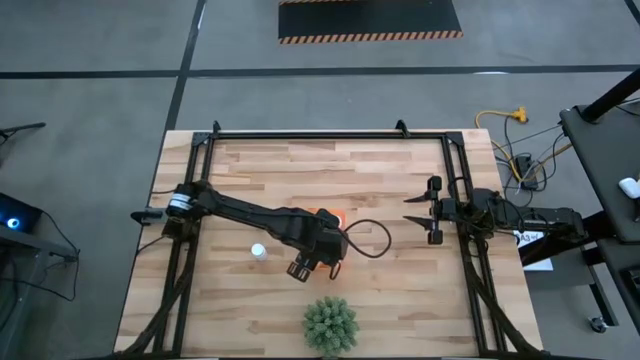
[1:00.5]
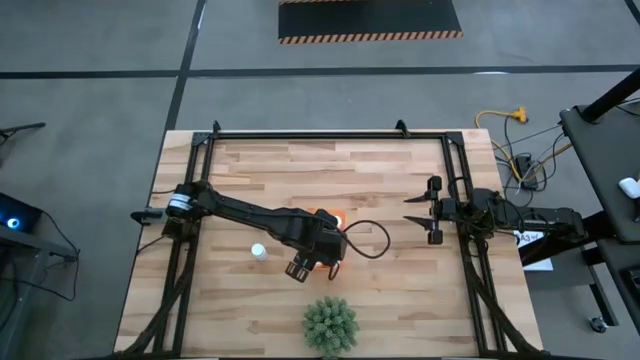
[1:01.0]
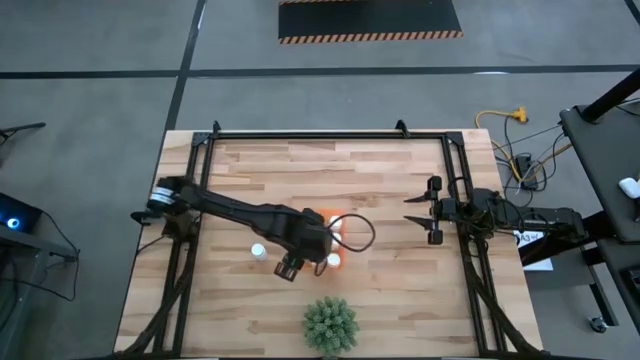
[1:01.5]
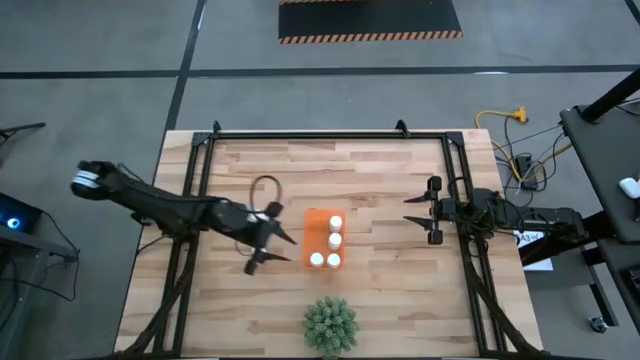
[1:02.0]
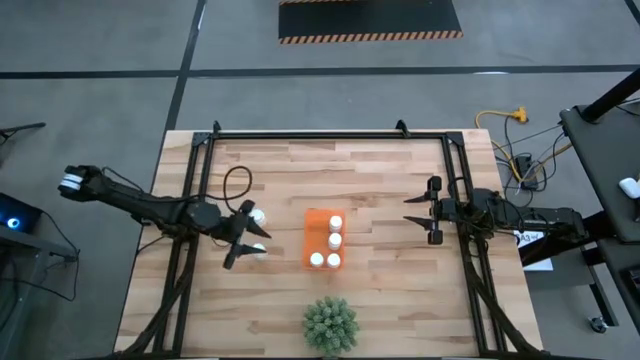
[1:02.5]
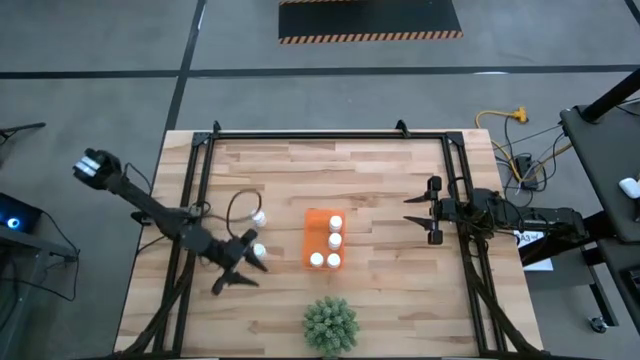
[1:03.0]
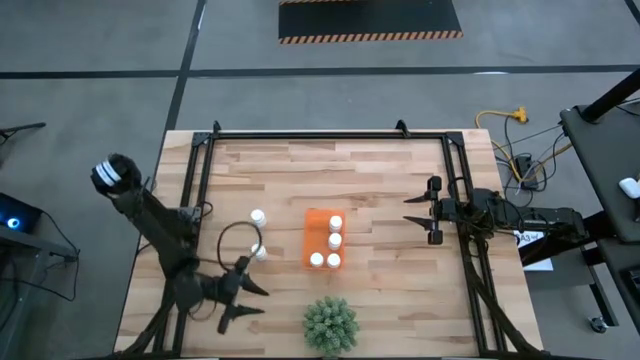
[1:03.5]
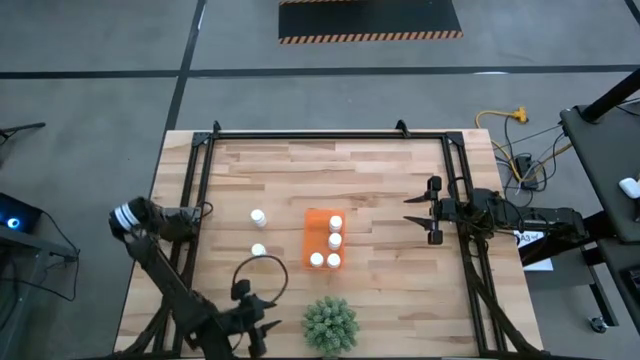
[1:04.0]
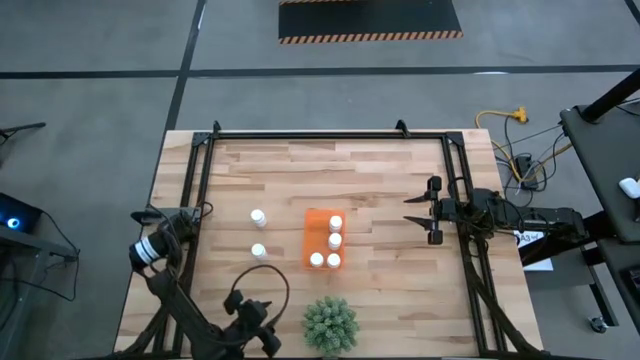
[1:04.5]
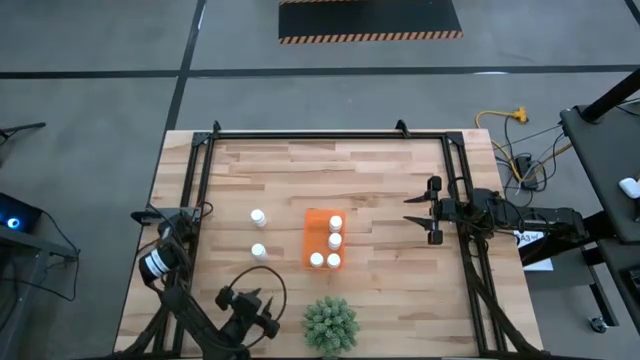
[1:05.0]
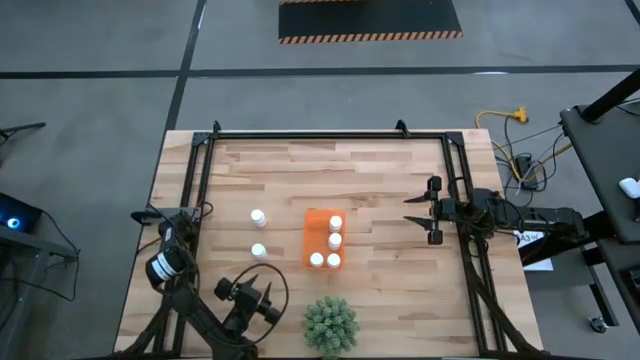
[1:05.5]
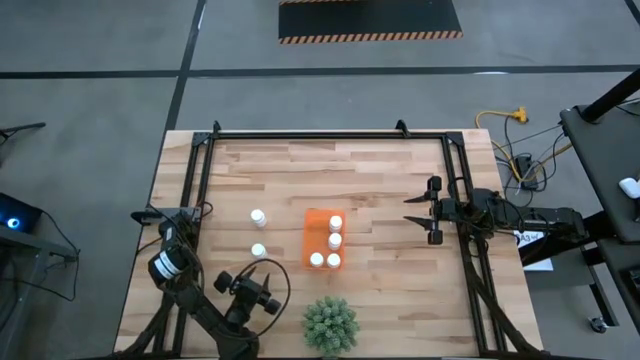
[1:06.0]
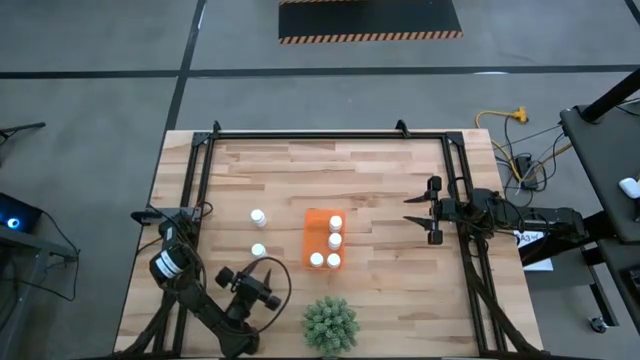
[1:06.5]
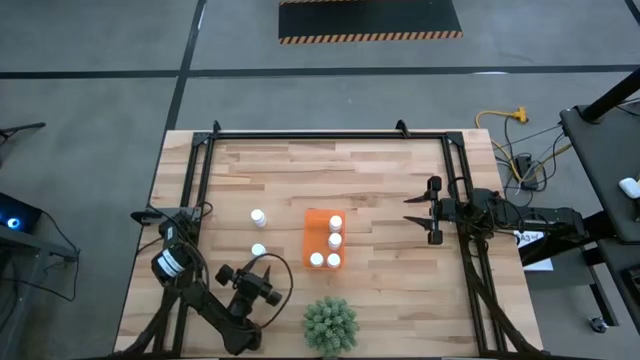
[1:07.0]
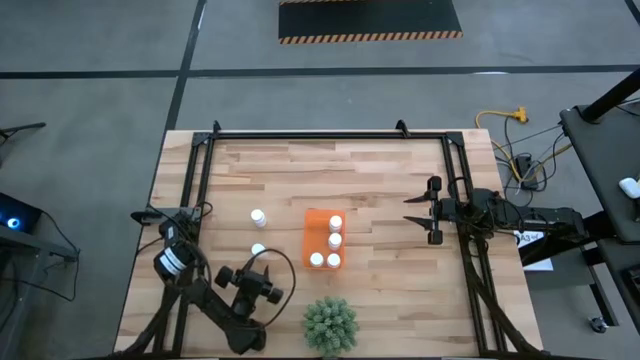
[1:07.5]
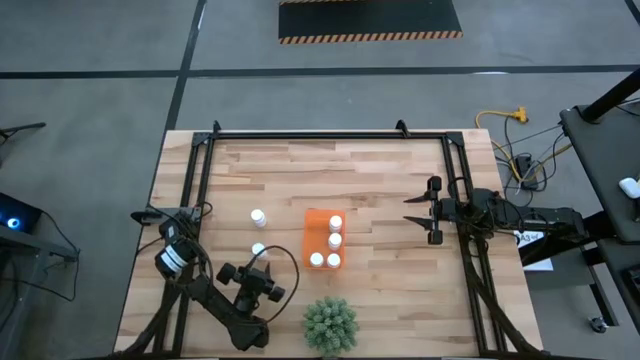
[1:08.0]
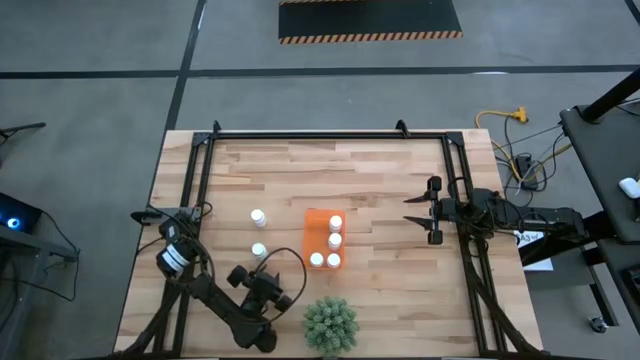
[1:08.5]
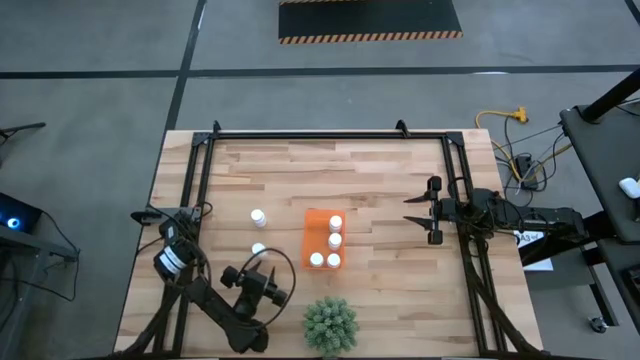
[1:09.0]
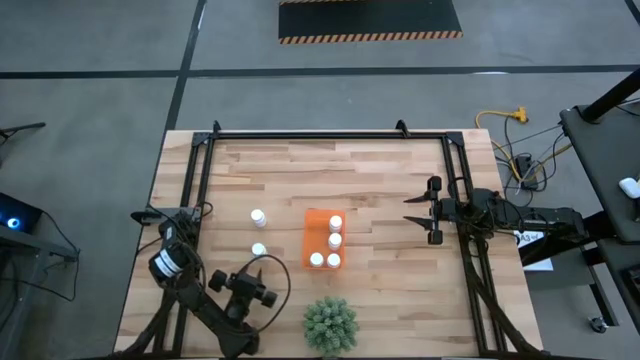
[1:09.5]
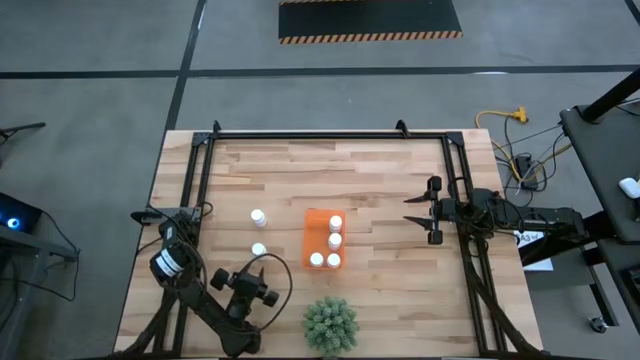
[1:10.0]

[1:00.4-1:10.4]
Task: Pick and place pill bottles into a basket
Put the white pill bottle into the orange bin

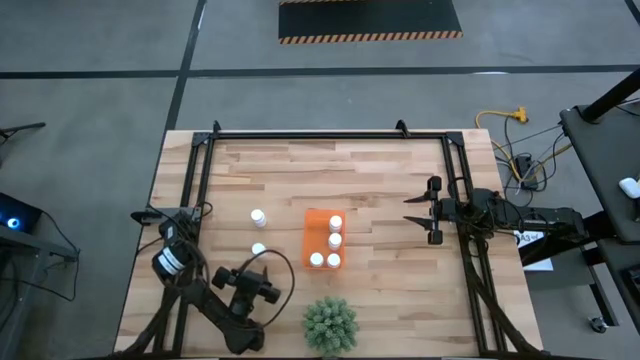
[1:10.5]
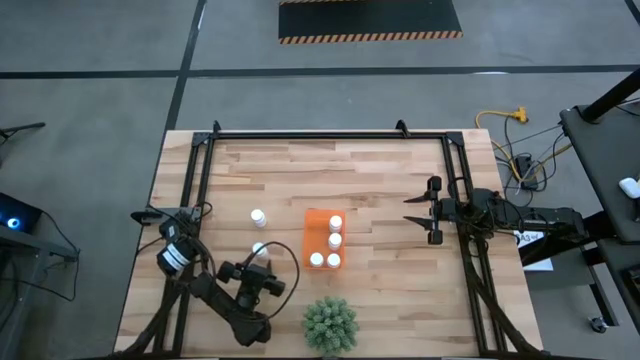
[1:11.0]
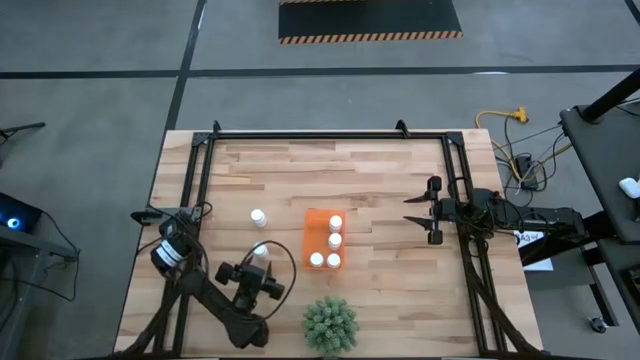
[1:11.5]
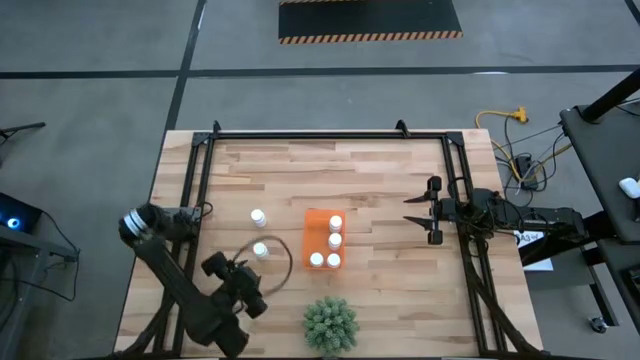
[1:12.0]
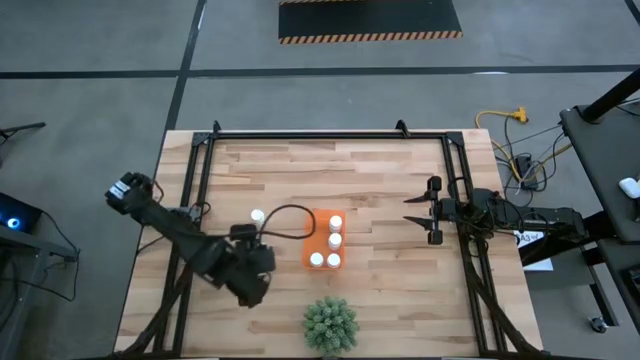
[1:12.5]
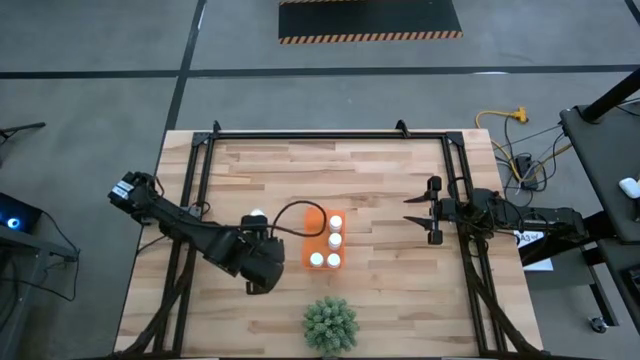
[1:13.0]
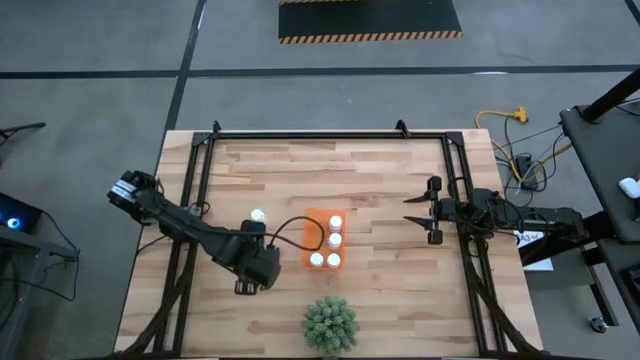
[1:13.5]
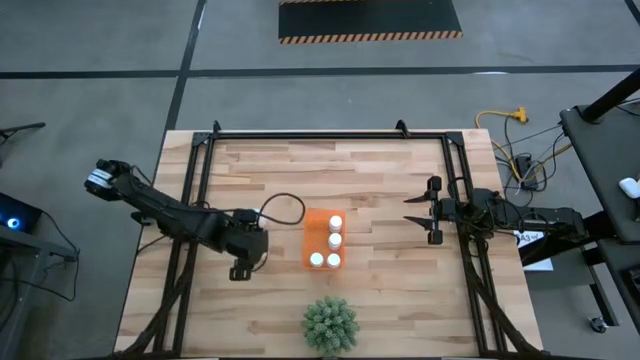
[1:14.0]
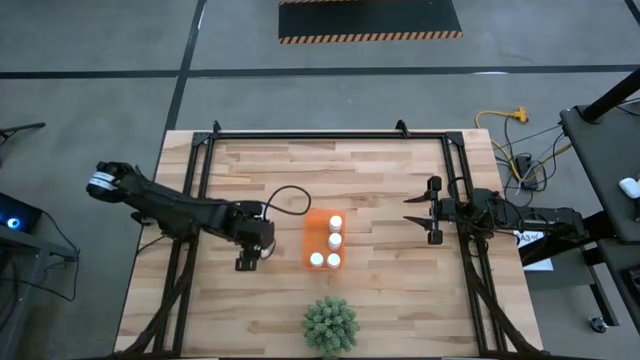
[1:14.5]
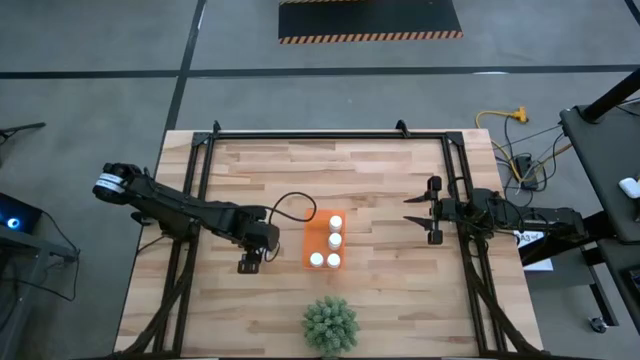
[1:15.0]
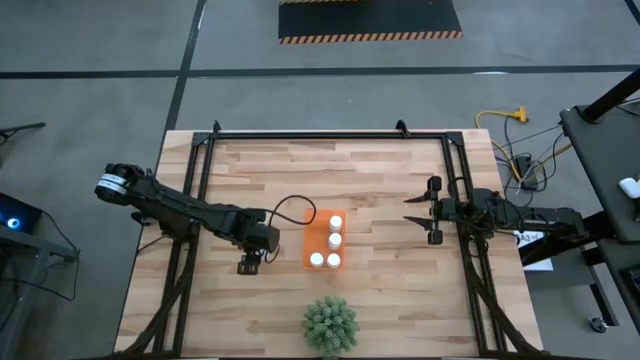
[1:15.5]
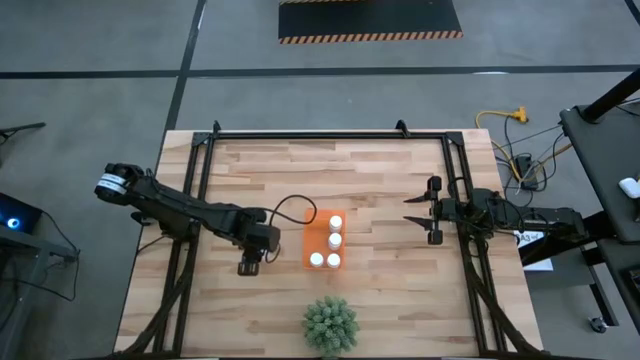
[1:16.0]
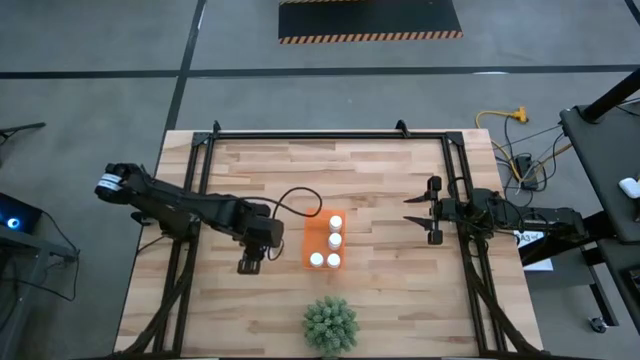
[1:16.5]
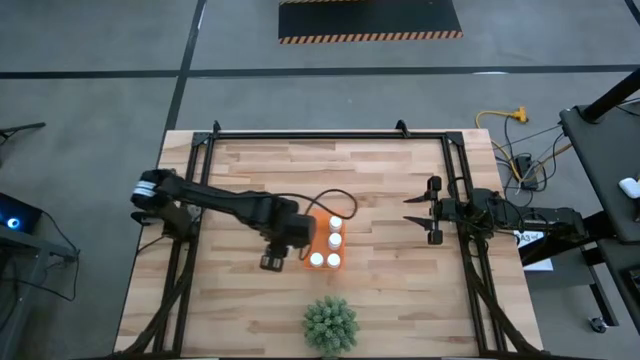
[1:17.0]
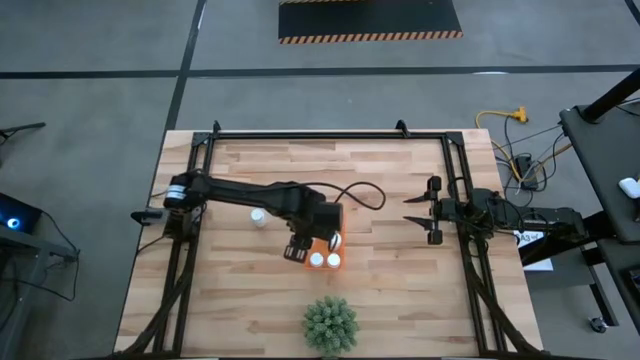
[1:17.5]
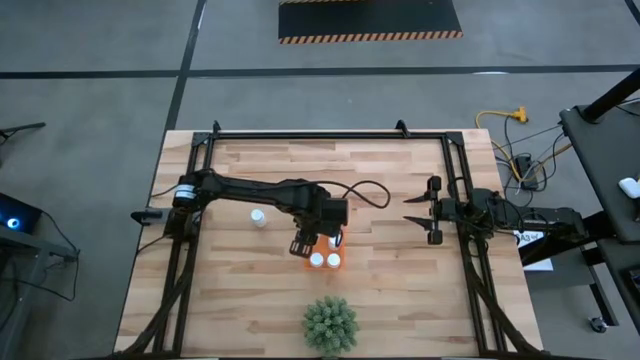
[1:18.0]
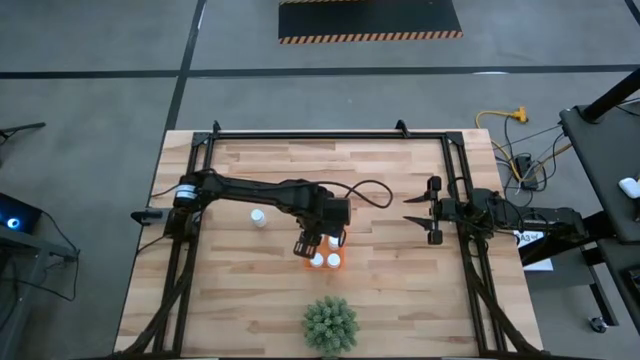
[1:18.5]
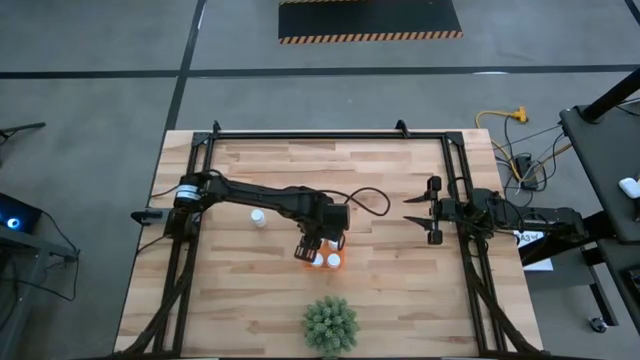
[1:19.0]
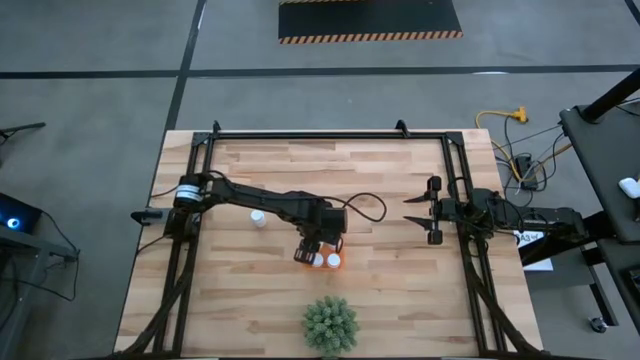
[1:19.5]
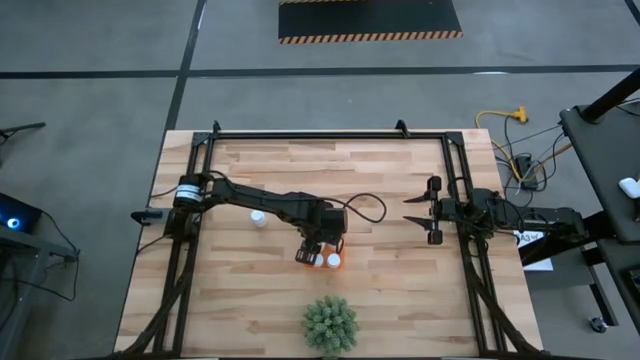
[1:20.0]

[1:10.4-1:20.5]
Put the white pill bottle into the orange bin
